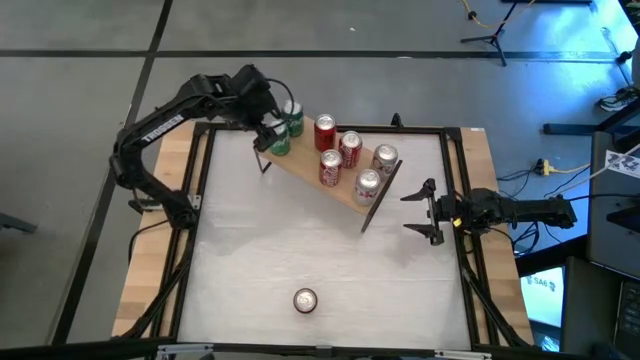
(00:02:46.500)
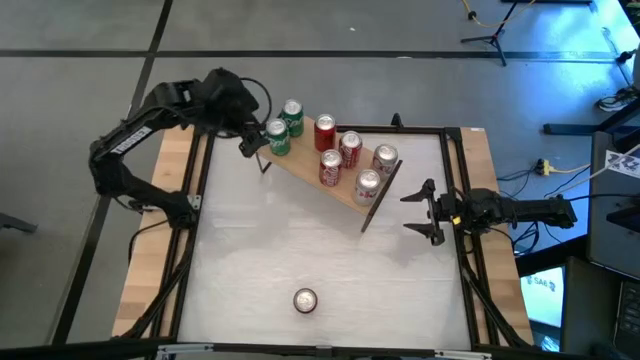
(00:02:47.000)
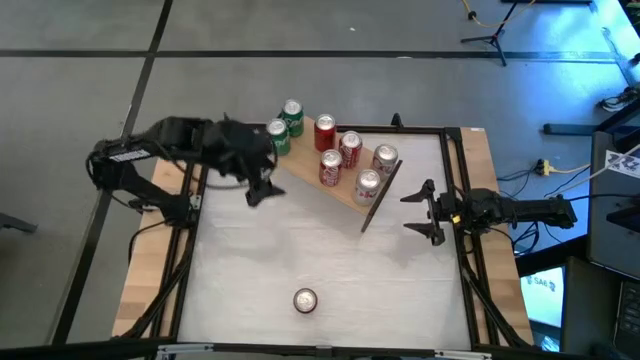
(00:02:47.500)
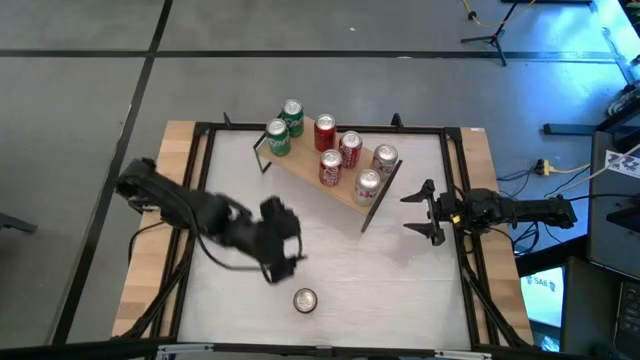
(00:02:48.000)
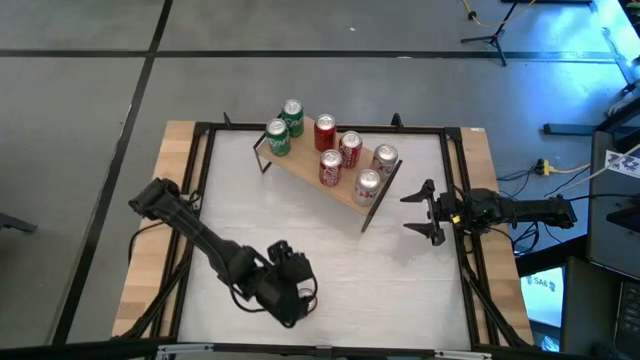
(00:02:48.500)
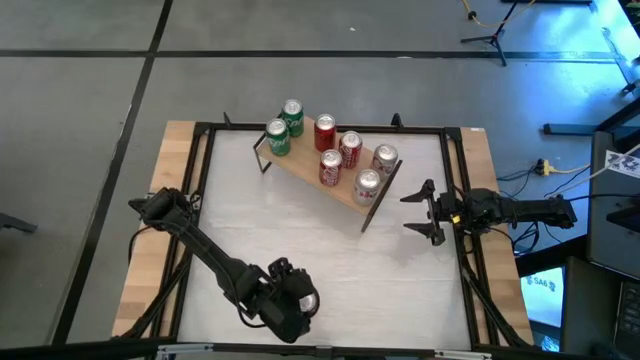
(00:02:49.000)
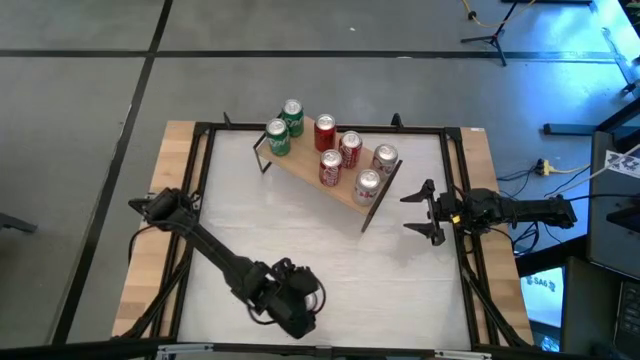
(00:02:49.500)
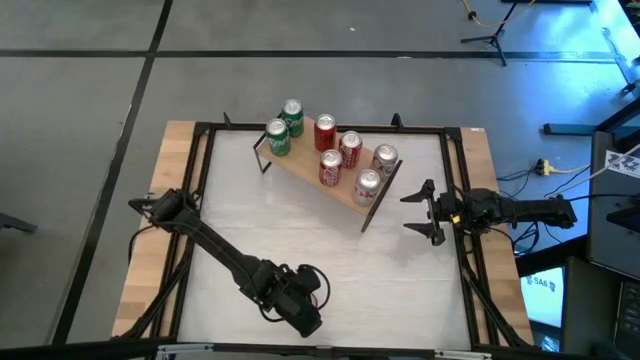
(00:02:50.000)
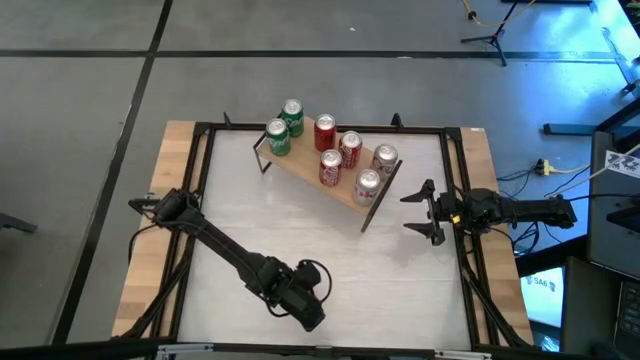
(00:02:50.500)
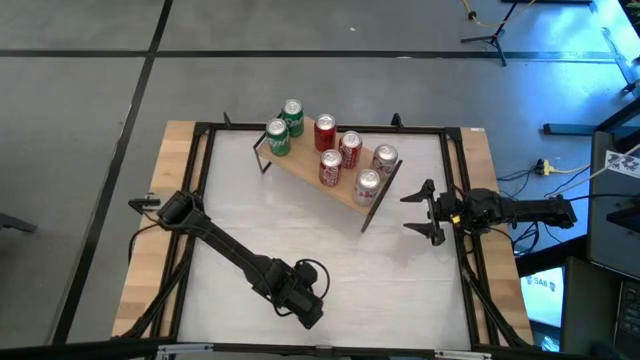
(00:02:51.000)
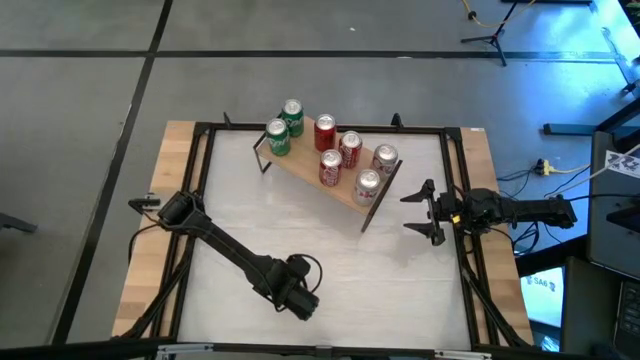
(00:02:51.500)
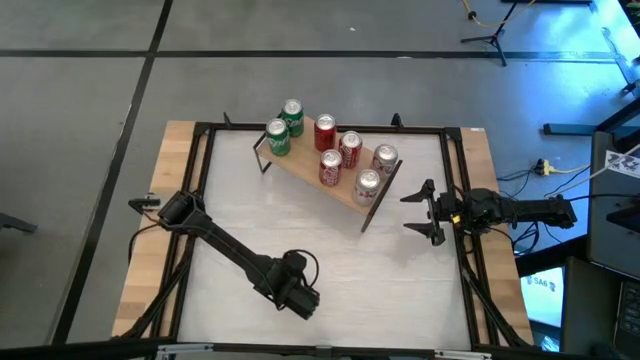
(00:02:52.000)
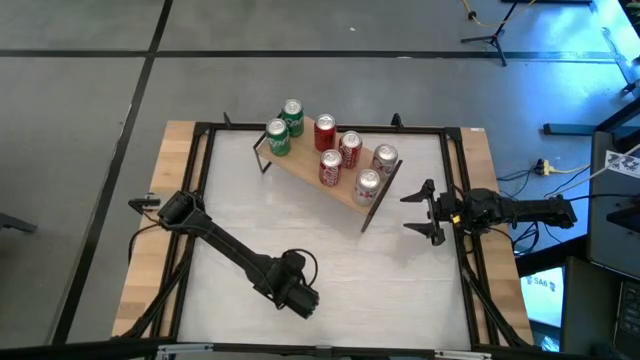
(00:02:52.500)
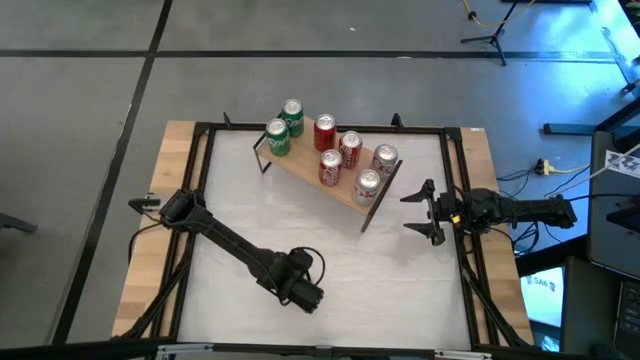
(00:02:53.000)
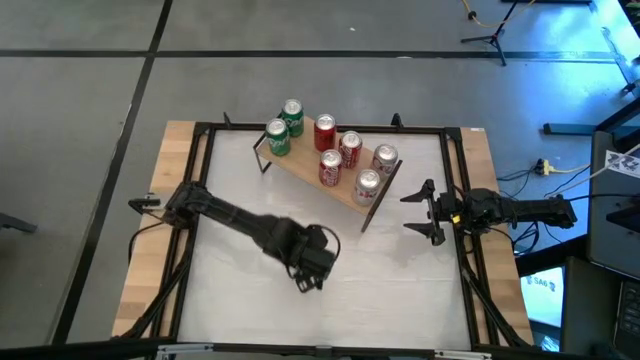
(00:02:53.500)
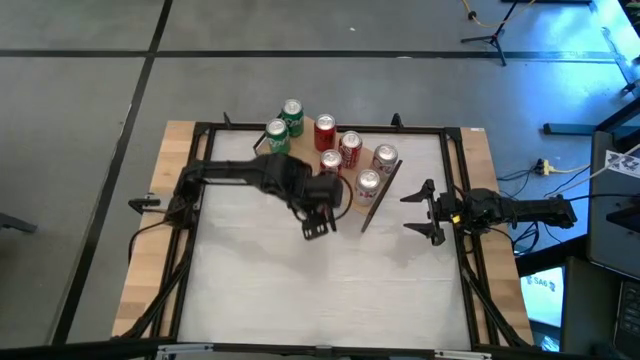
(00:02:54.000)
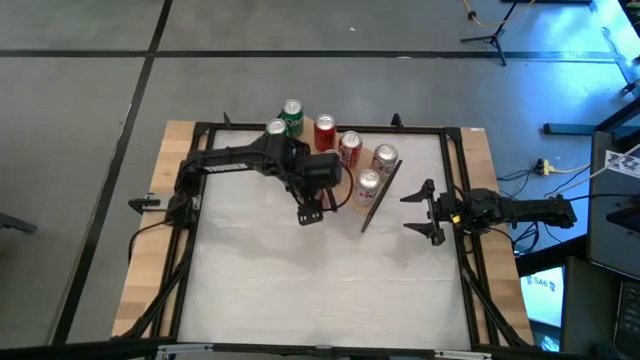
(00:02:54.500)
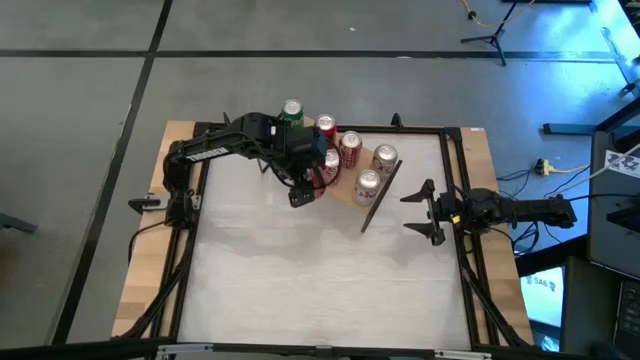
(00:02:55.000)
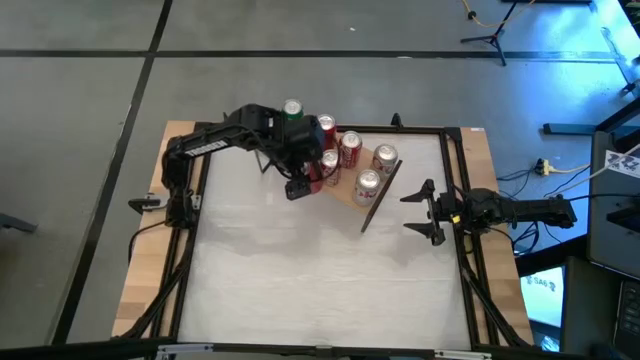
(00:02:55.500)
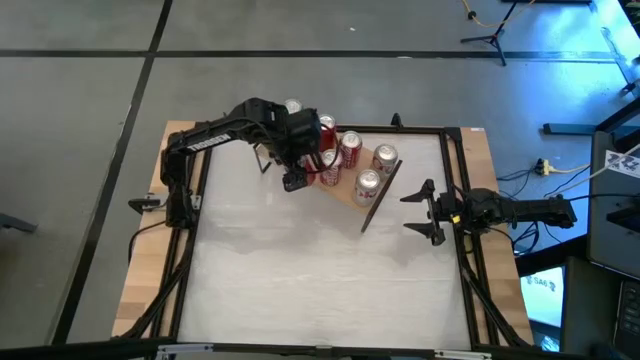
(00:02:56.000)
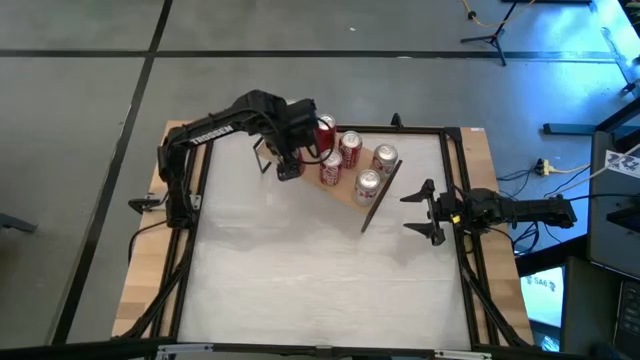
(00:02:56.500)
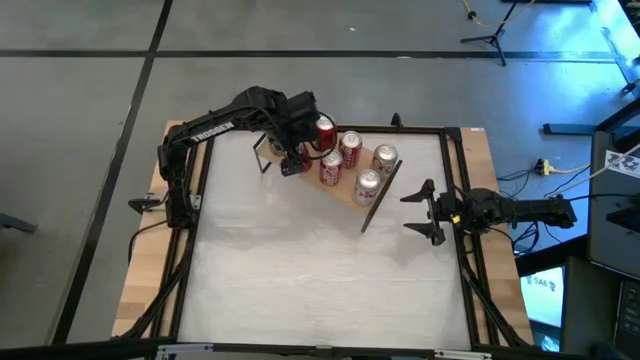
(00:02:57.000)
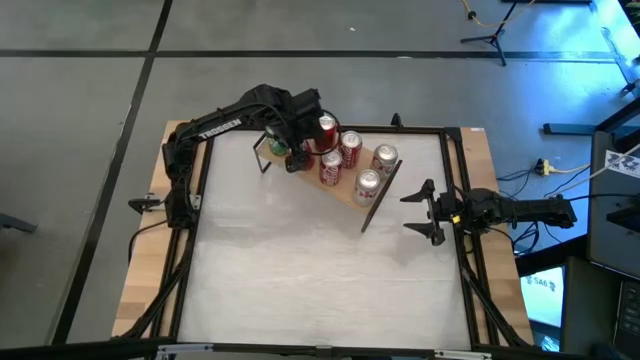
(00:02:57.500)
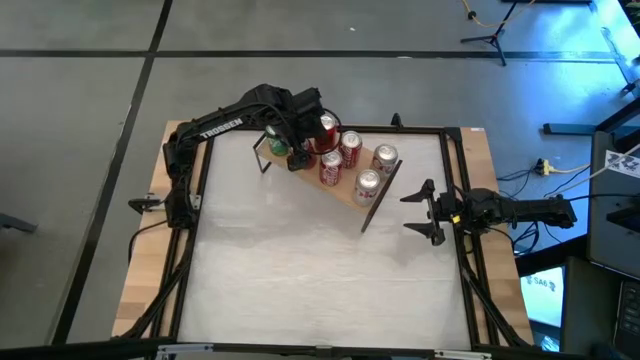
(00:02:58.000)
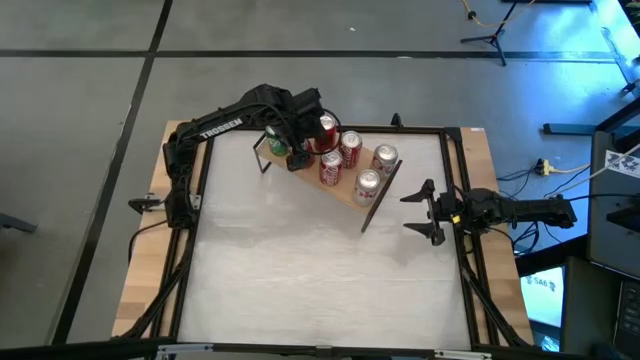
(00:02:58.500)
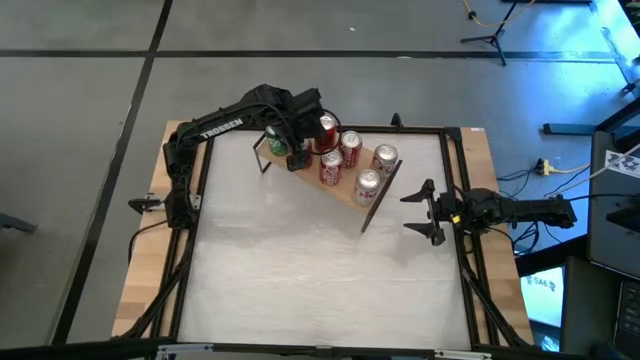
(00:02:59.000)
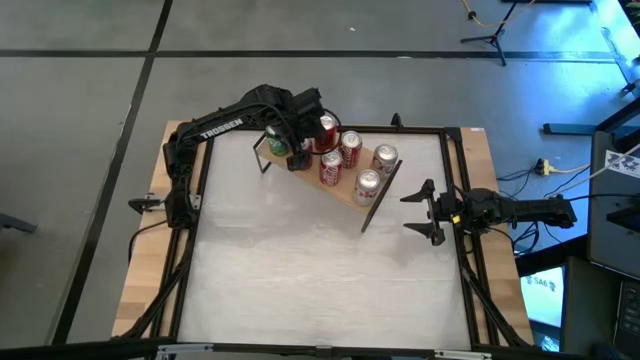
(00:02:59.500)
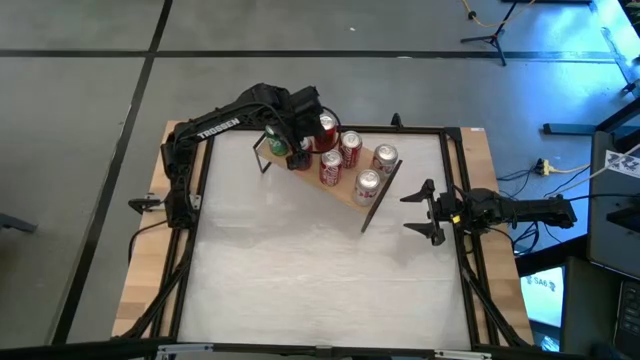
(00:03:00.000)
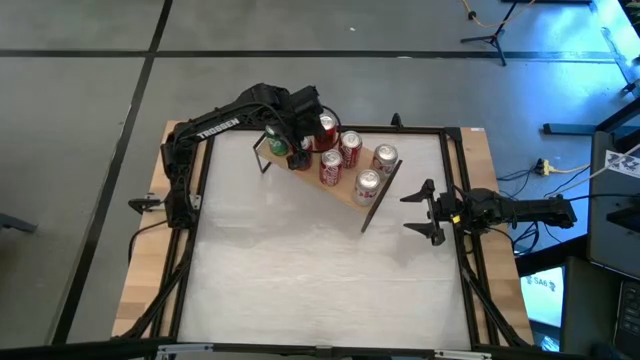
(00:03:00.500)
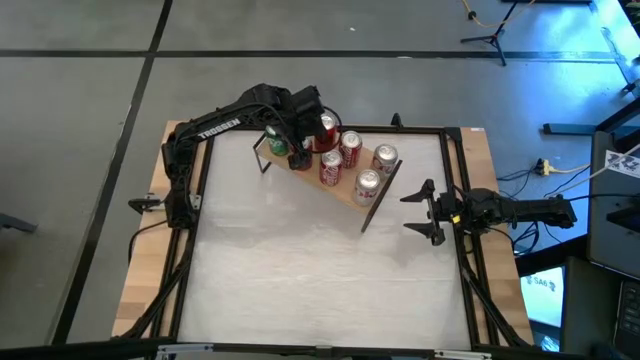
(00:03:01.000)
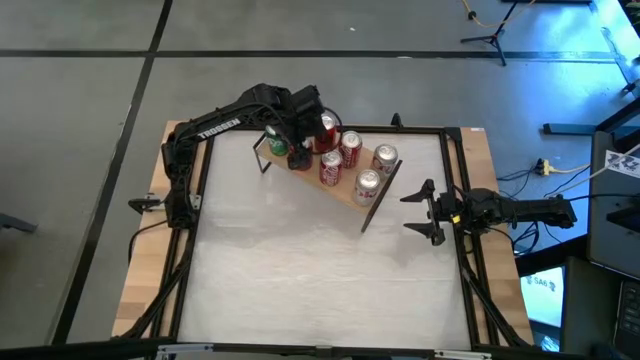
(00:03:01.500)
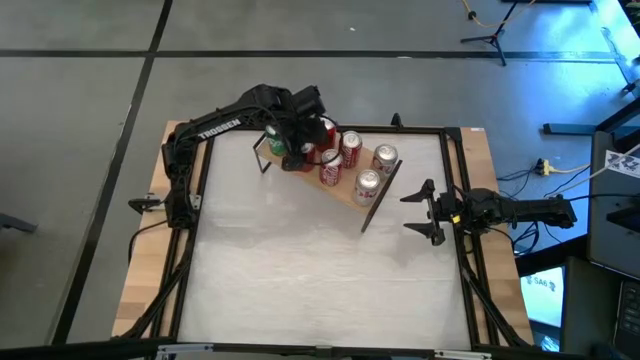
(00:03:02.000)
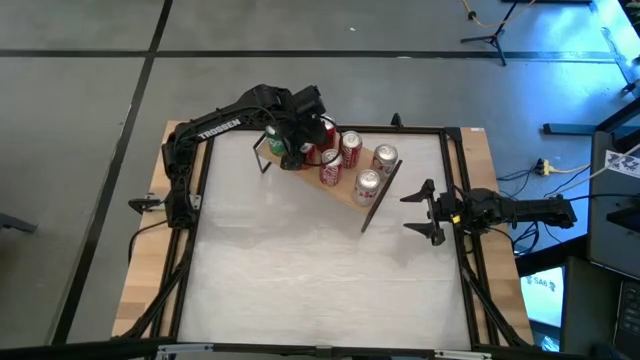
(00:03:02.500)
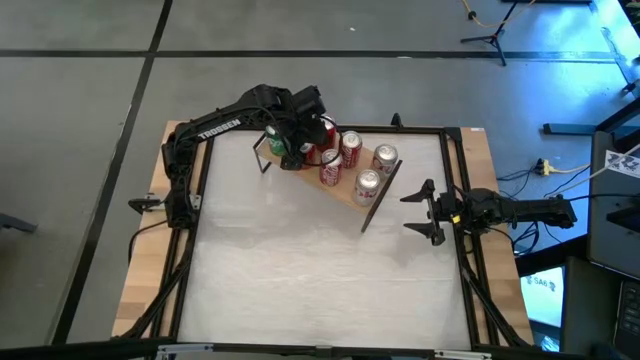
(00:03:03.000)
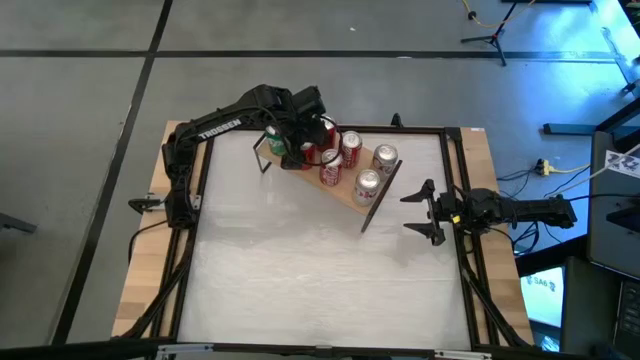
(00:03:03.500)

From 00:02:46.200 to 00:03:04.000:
Task: Place canned beverage on shelf
Put the red-black soda can on the shelf aligned with the other red-black soda can
